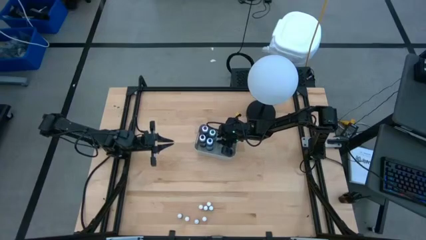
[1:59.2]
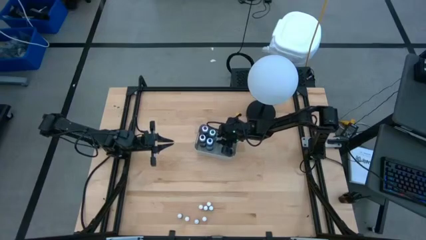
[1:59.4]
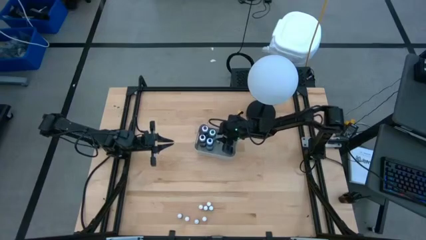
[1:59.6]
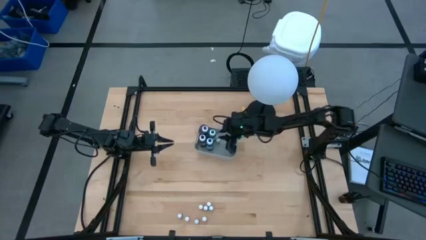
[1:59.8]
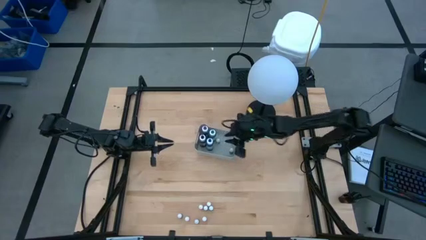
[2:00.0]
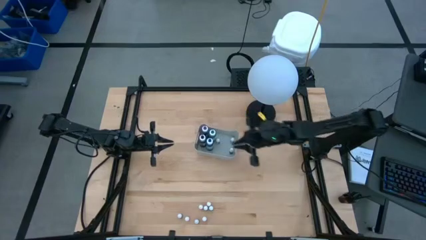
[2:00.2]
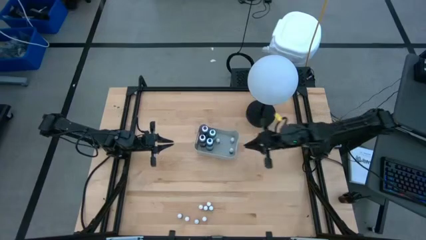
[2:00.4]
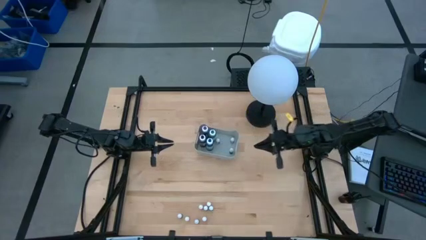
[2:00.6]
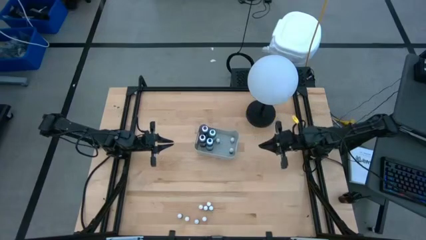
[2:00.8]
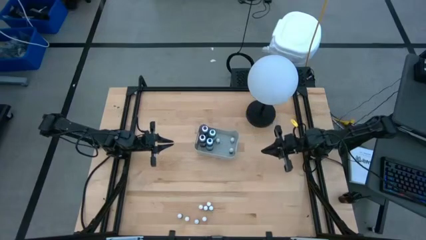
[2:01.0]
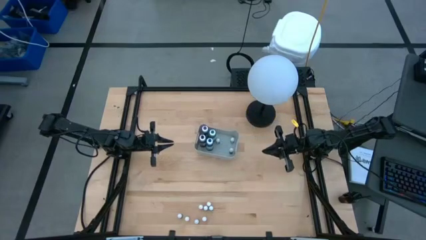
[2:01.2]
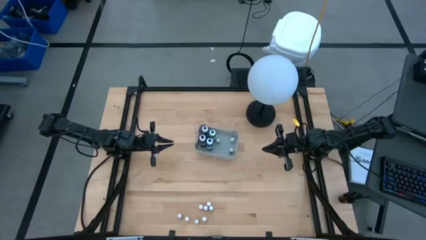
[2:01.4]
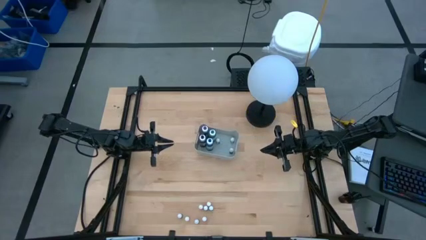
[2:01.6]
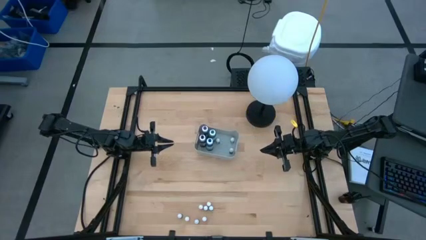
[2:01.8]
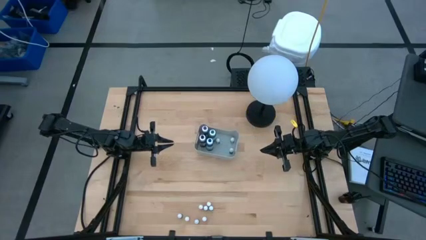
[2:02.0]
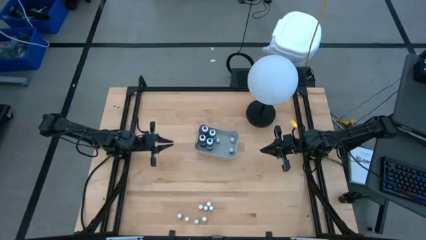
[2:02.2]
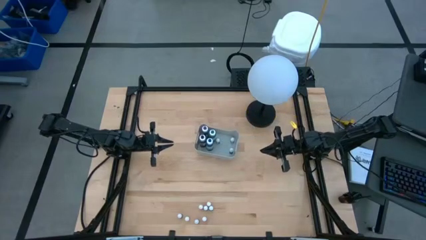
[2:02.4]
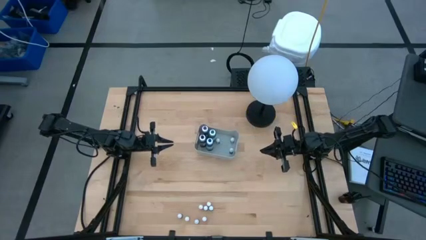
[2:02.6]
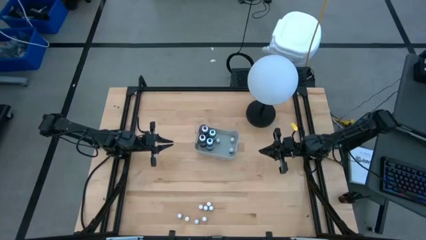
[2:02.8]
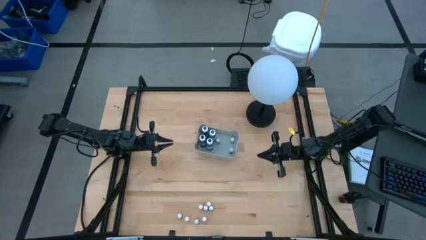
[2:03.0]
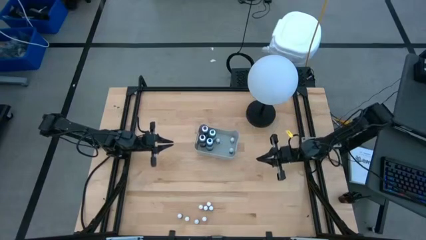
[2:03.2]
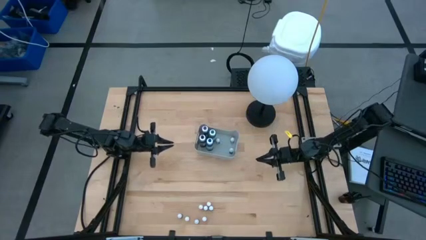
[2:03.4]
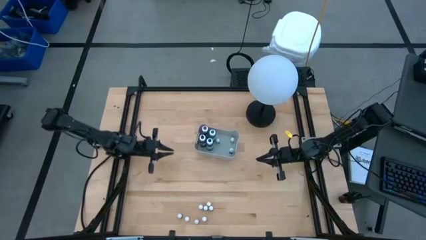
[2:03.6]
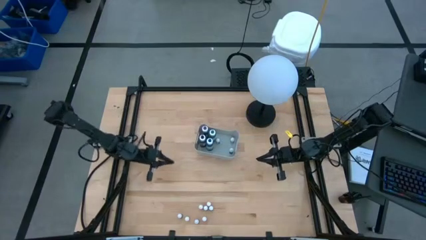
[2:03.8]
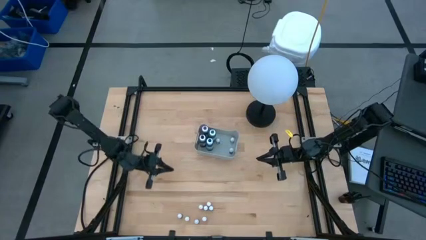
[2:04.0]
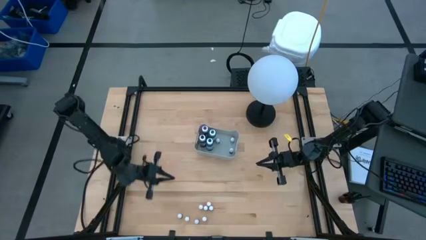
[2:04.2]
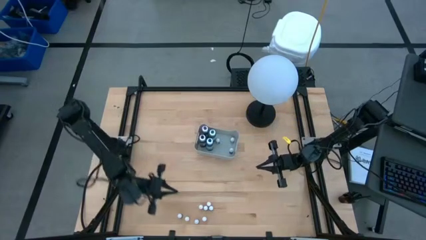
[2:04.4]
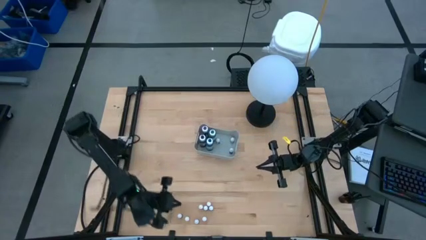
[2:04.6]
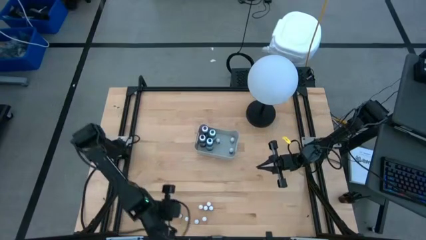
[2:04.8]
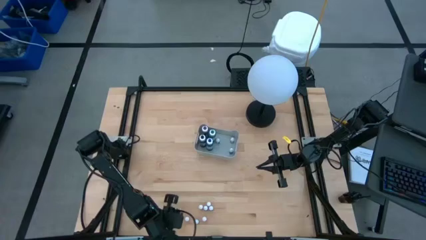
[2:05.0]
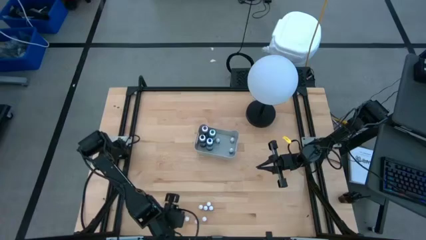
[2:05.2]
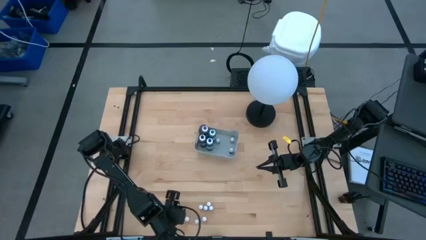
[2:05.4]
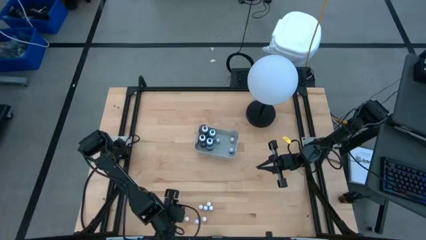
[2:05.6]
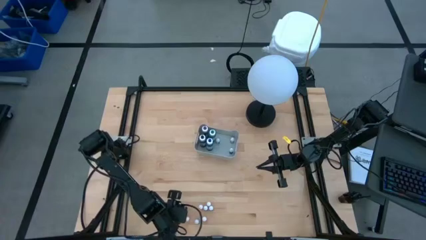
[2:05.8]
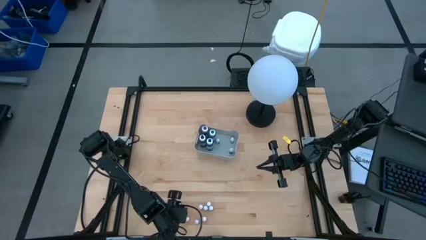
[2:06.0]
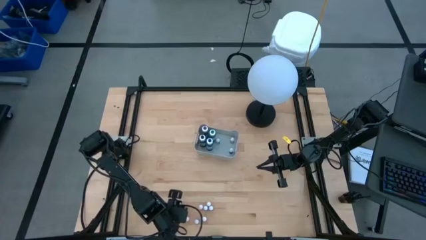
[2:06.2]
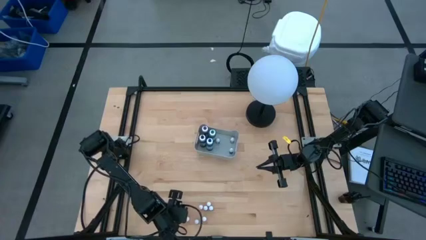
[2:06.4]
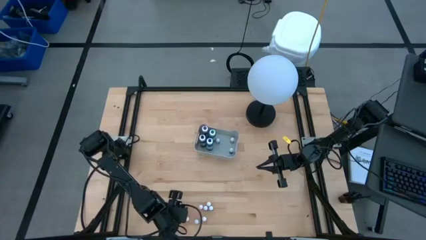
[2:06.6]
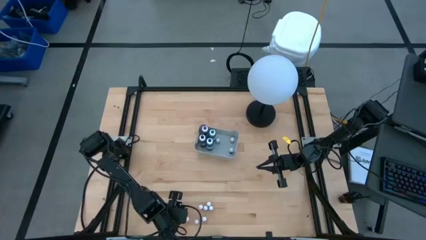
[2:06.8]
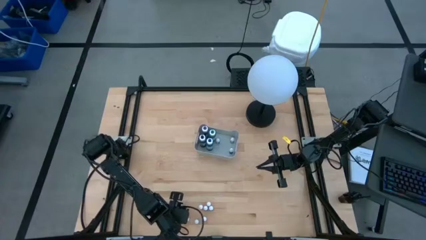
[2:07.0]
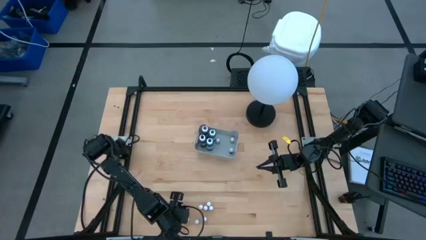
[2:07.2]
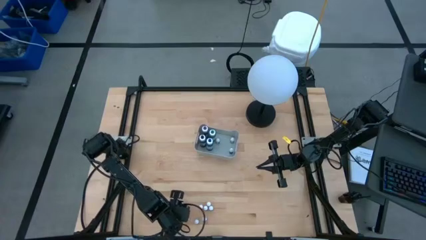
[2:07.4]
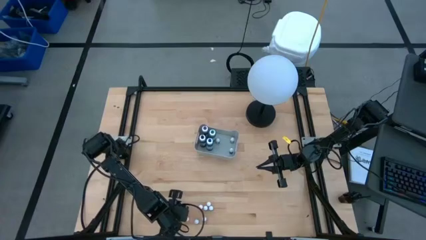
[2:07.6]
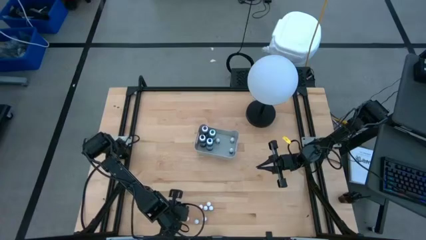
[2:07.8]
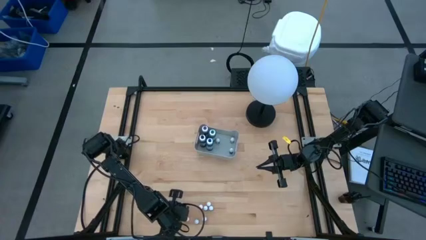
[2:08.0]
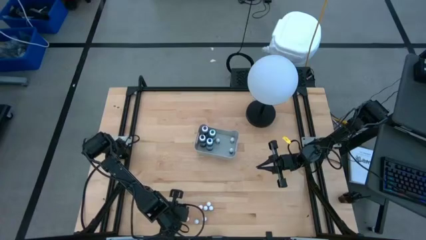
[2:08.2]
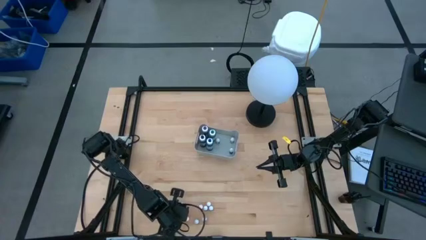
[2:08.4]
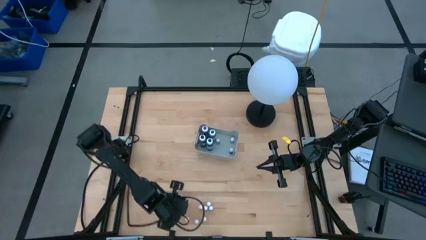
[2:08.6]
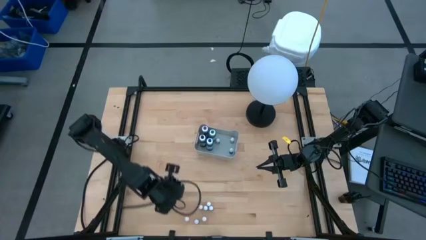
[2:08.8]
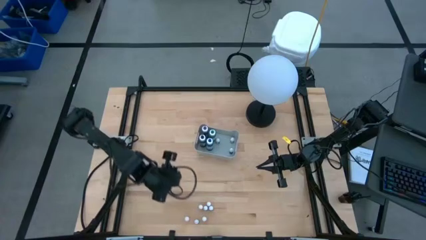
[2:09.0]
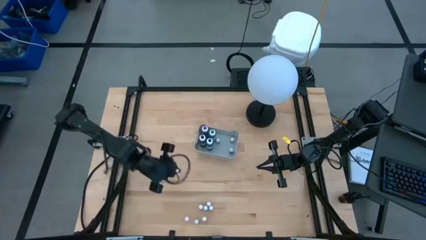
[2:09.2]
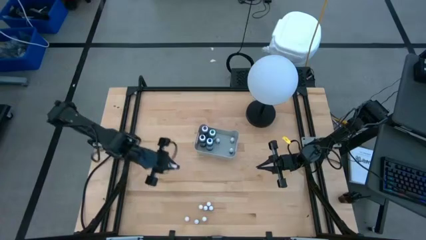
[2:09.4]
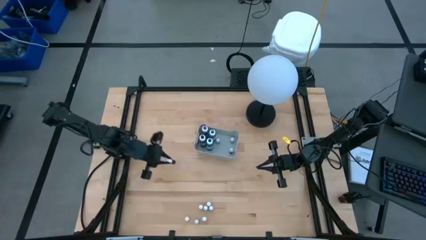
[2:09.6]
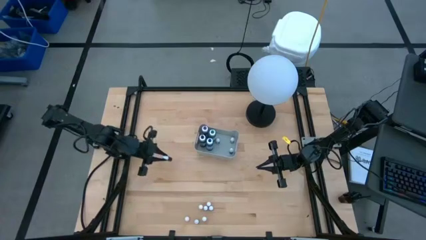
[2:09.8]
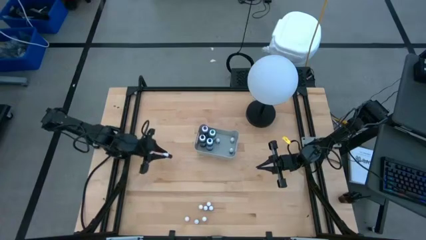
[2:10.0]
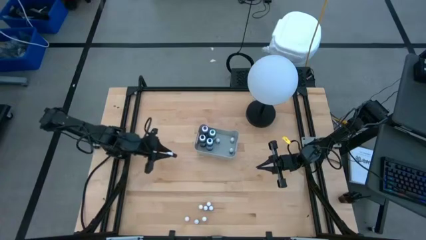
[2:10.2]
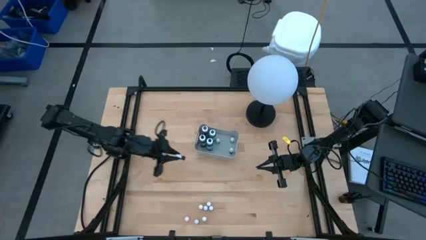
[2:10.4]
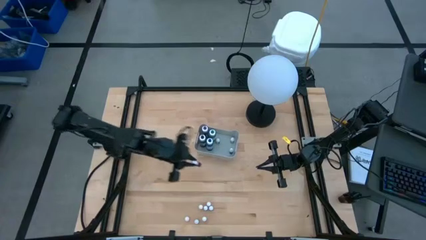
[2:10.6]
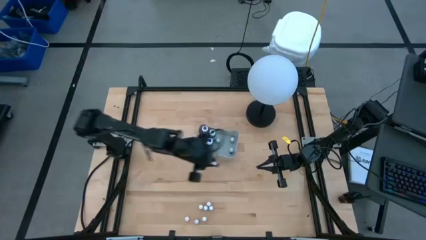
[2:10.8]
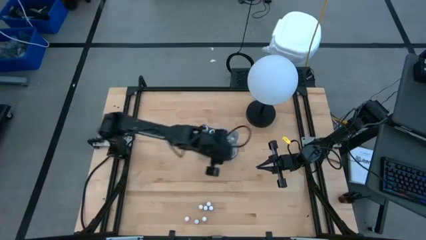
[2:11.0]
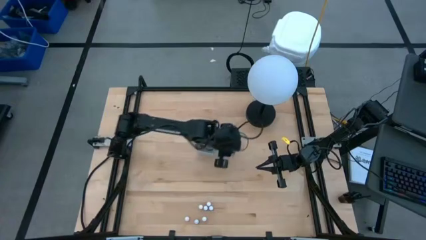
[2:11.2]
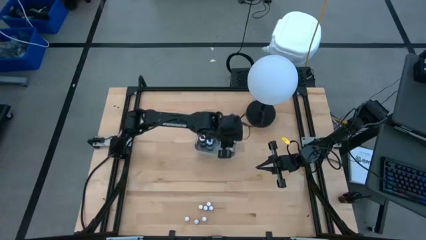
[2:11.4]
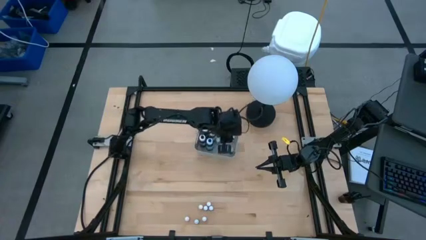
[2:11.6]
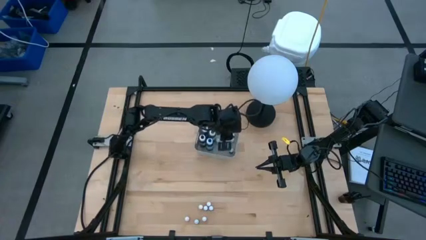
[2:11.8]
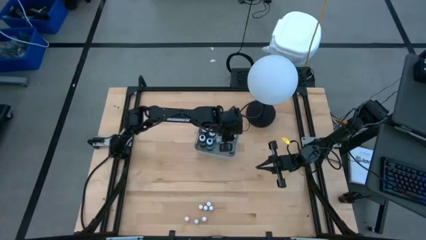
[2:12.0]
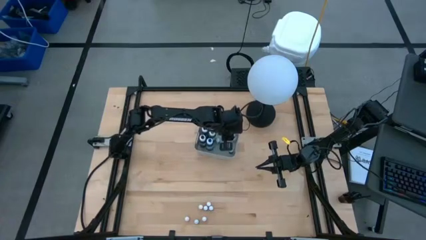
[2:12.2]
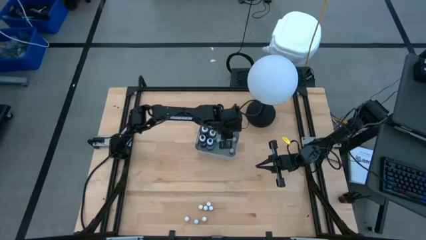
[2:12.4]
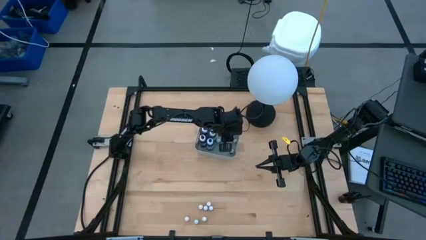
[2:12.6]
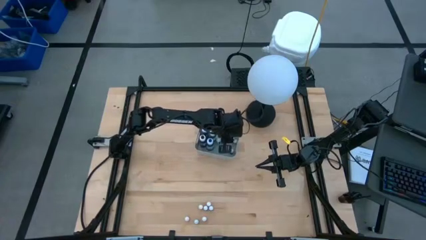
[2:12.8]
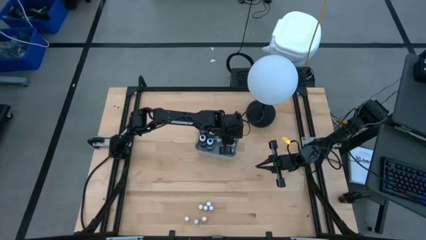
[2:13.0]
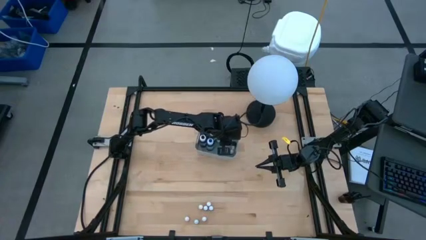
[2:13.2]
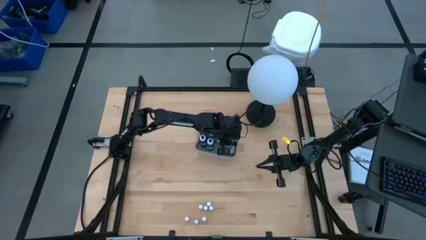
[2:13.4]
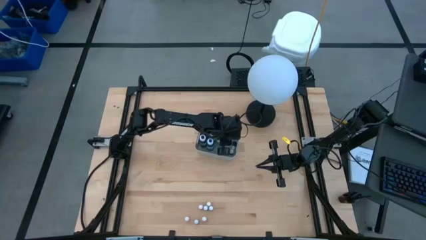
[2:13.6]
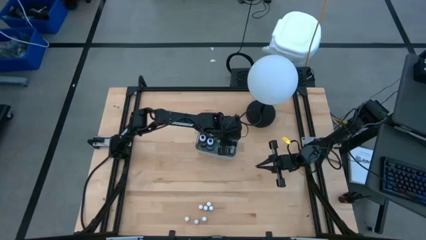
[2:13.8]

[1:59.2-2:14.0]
Task: Pick & Place food coloring
Put the small black food coloring bottle into the gray bin

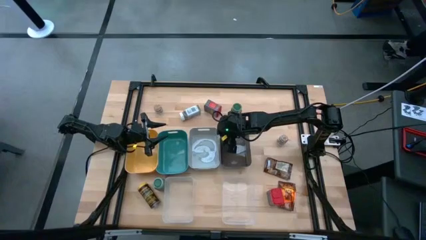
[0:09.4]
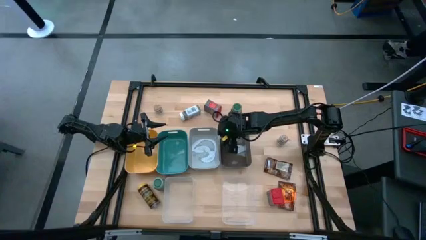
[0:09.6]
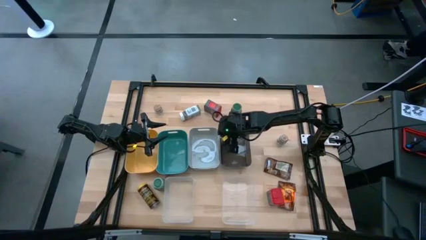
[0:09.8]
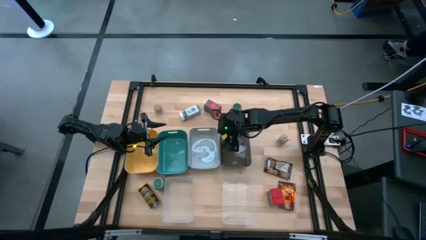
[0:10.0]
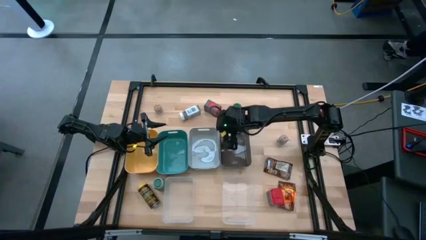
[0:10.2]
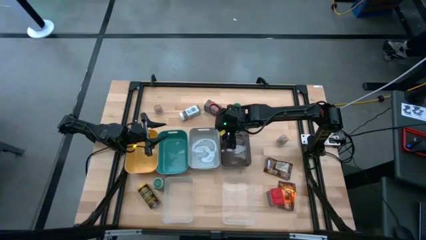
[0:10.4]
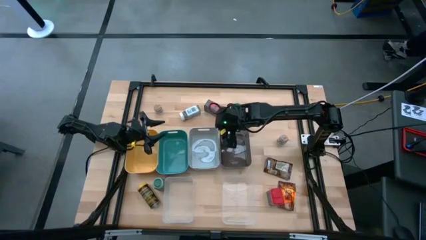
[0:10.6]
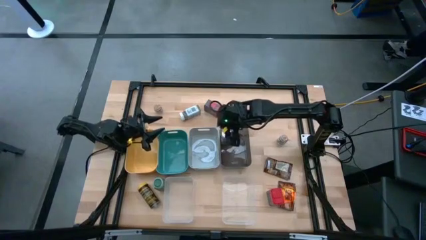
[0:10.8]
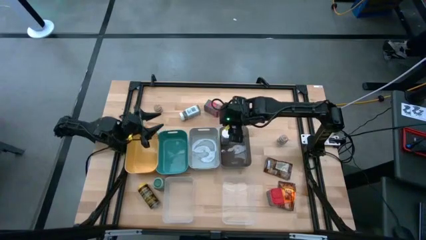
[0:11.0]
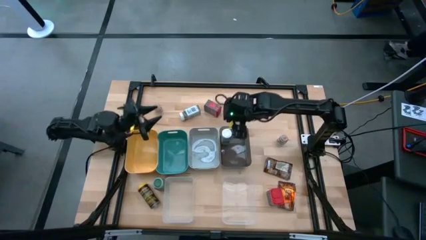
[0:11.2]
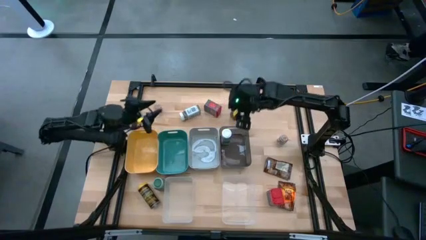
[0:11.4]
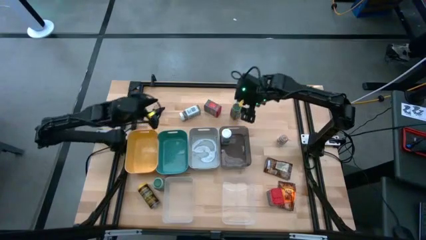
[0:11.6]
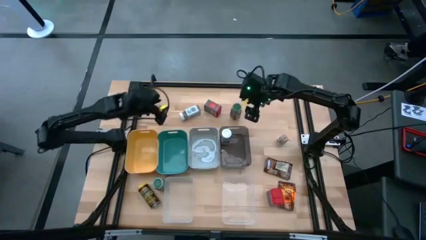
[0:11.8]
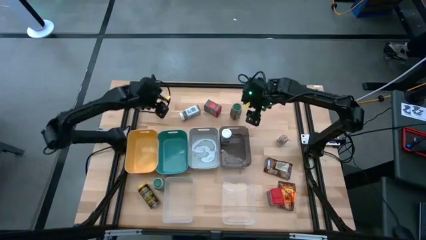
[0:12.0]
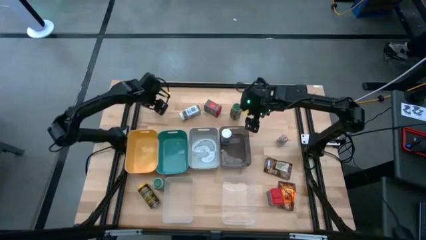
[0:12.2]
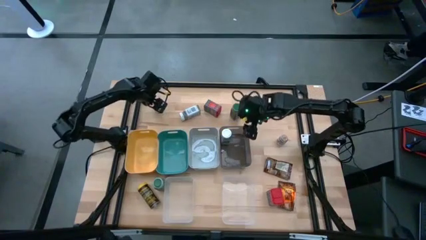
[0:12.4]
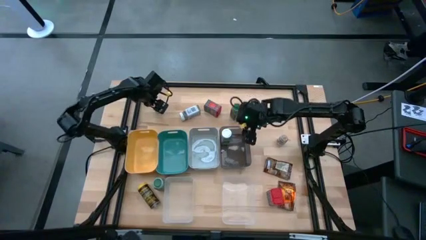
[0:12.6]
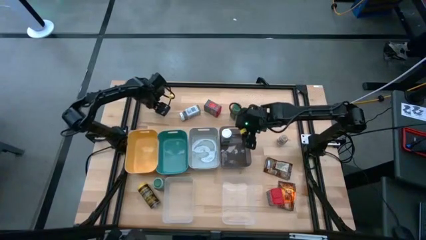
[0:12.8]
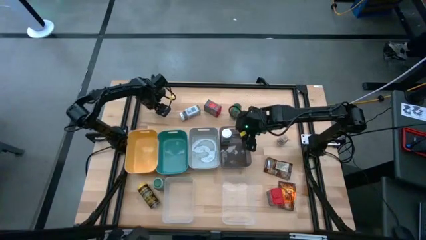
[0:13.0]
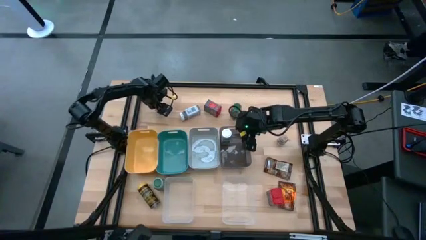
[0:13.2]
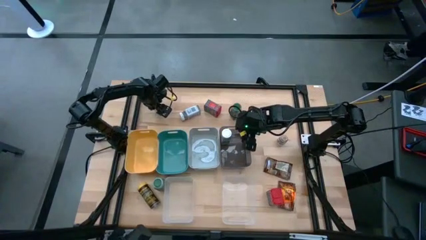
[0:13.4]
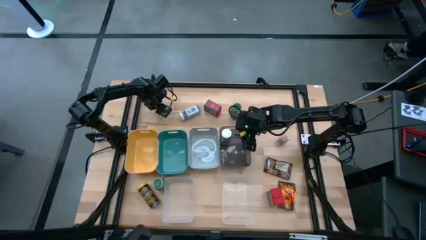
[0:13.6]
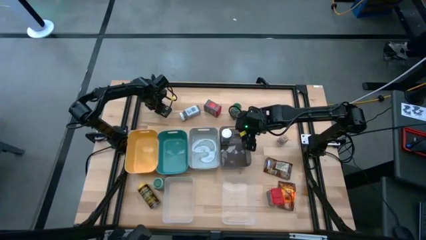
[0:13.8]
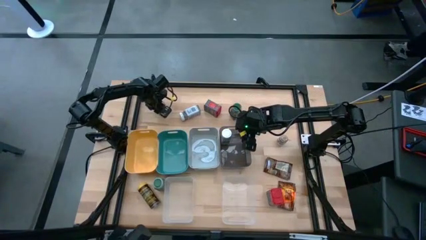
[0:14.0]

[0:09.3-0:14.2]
Task: Sort spices by type
Put the left brown seasoning bottle into the gray bin
